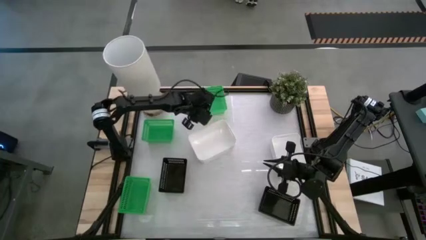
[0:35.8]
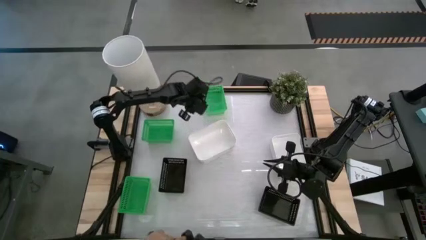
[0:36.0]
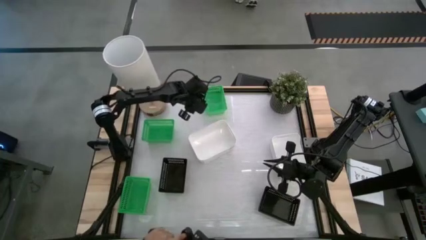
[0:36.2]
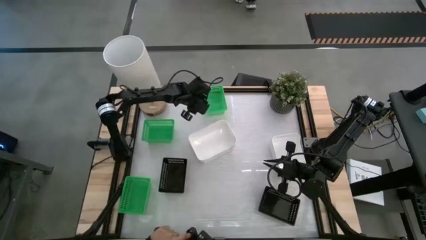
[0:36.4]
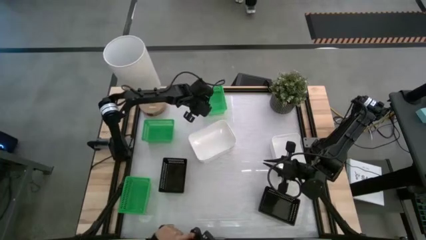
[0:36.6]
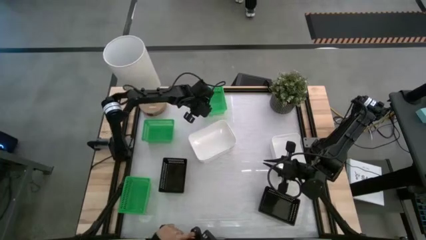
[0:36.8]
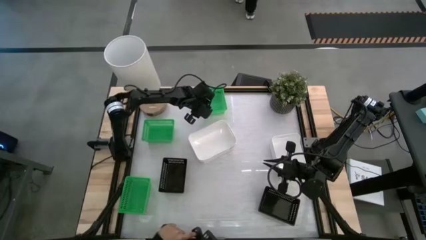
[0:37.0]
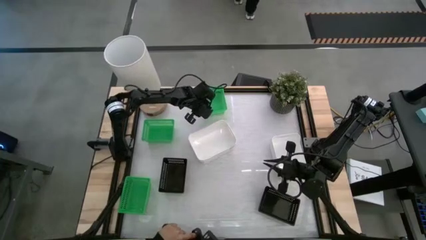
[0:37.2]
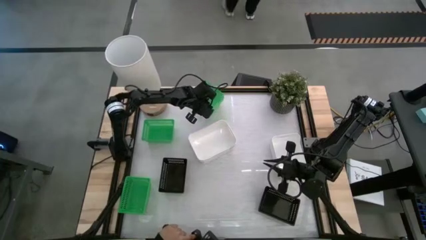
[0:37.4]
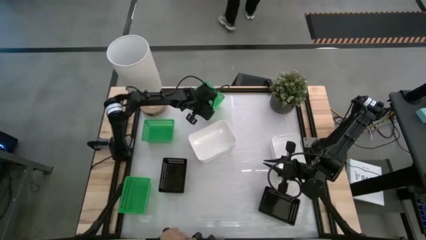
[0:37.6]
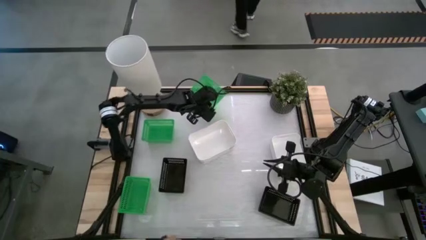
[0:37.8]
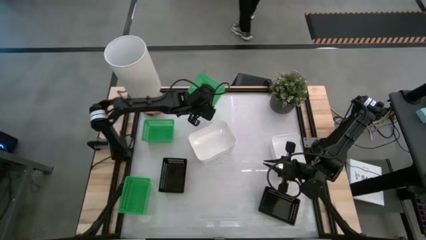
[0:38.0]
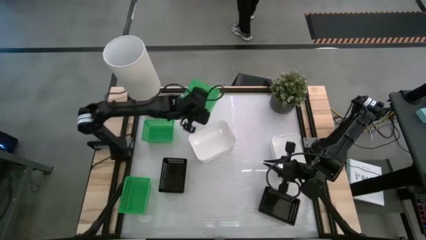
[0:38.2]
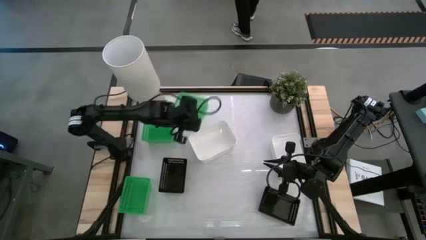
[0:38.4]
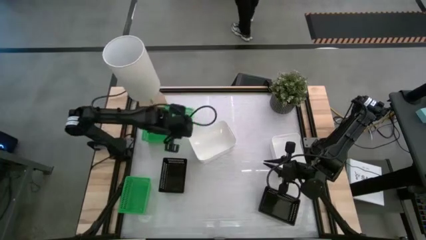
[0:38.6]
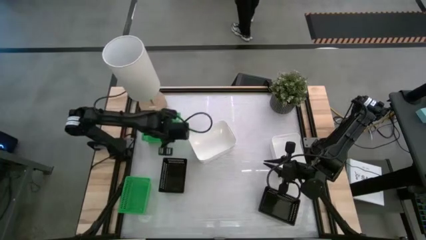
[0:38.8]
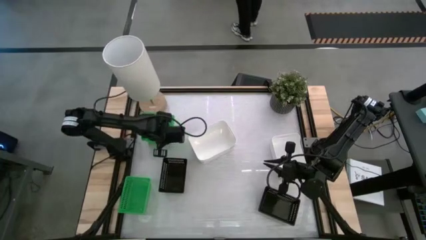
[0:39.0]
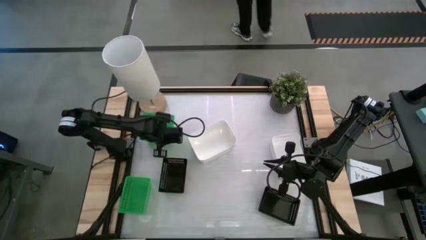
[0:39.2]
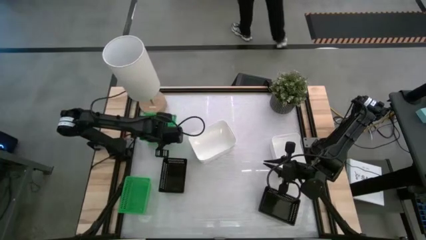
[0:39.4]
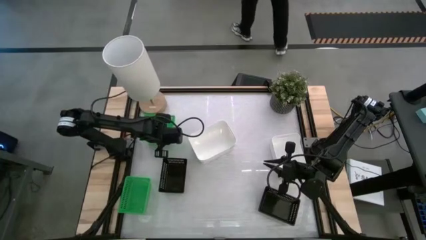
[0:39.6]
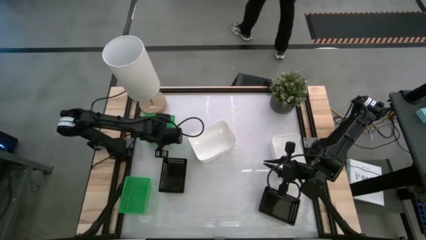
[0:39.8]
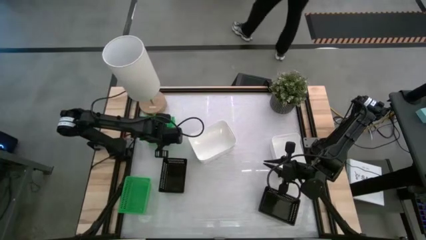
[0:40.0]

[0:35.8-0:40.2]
Stack the top green bin on top of the middle green bin

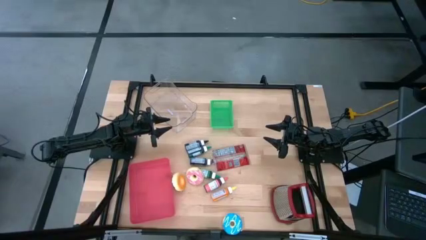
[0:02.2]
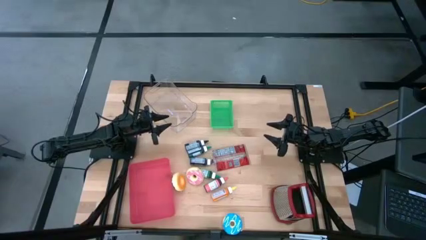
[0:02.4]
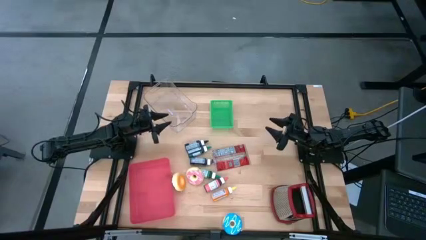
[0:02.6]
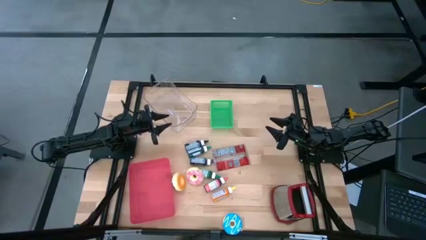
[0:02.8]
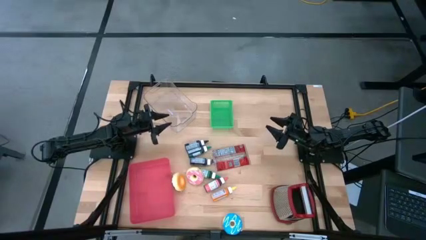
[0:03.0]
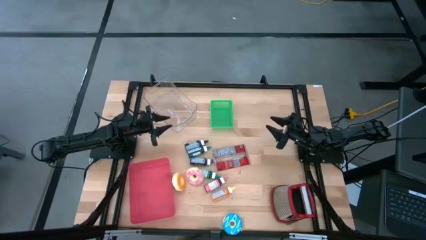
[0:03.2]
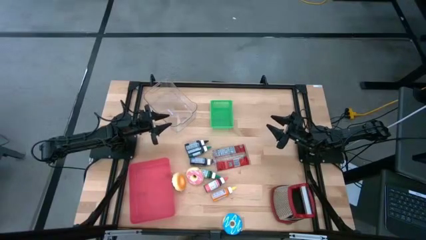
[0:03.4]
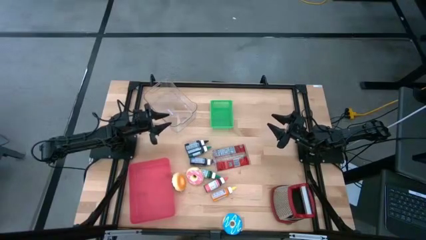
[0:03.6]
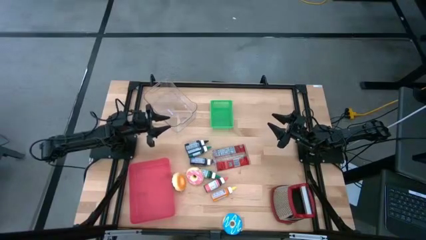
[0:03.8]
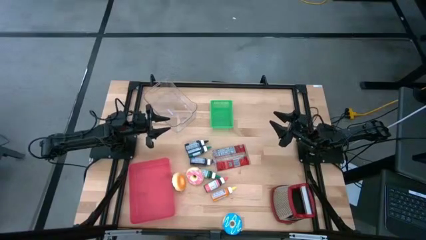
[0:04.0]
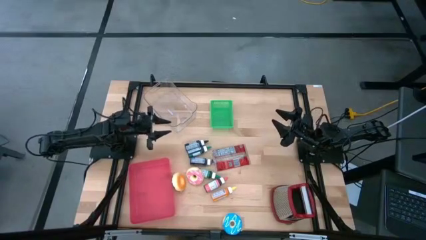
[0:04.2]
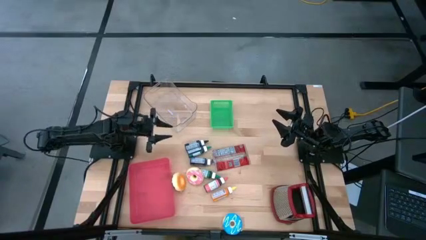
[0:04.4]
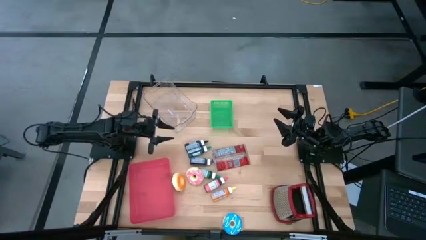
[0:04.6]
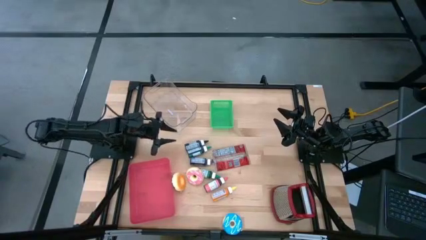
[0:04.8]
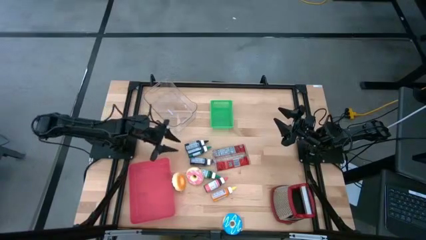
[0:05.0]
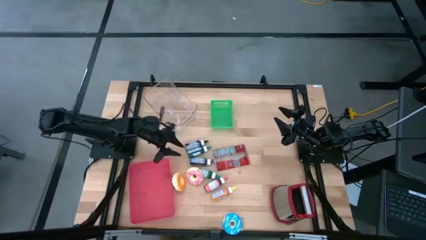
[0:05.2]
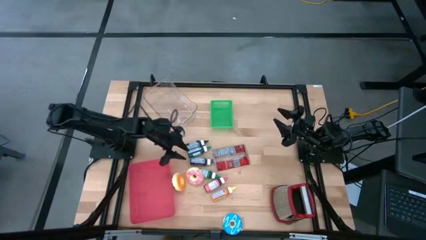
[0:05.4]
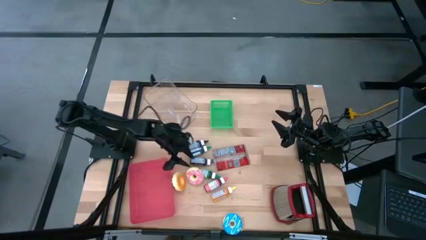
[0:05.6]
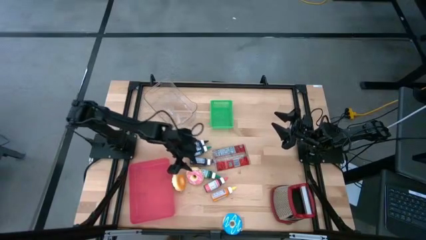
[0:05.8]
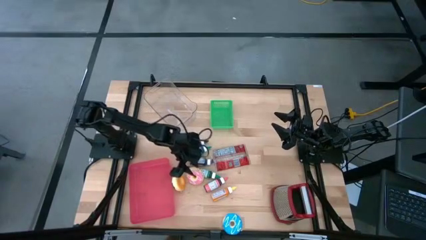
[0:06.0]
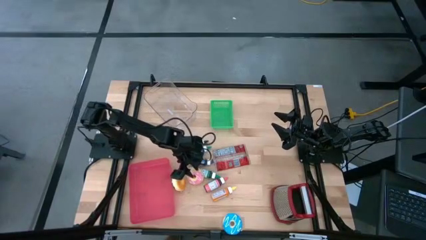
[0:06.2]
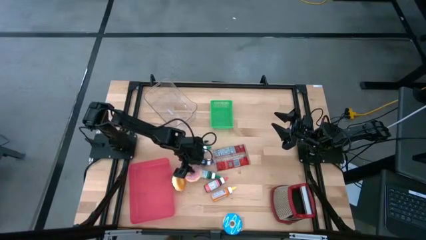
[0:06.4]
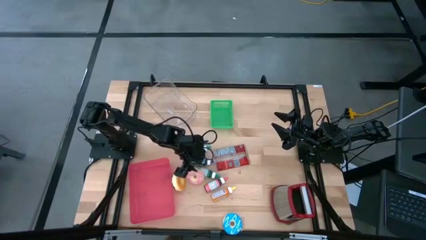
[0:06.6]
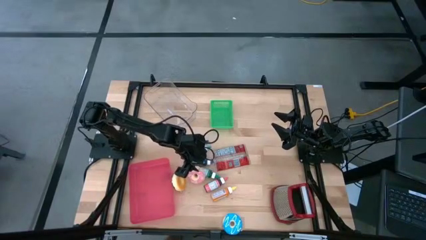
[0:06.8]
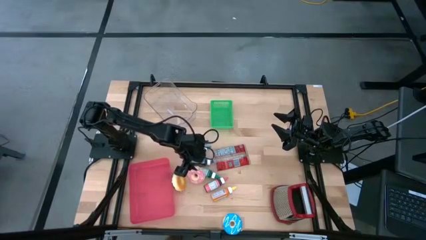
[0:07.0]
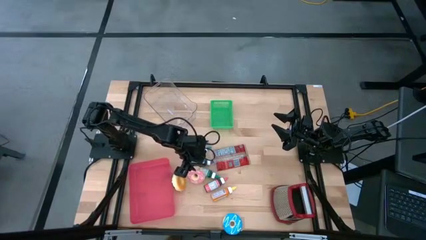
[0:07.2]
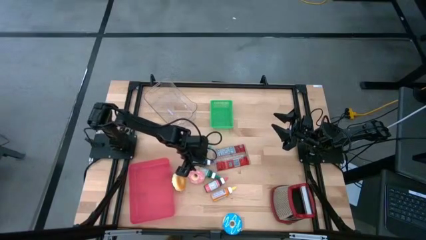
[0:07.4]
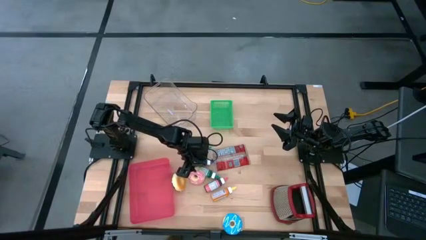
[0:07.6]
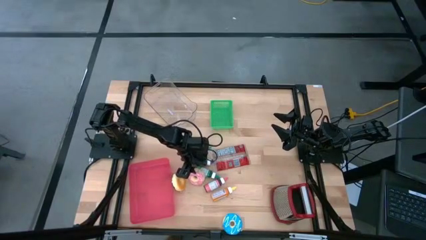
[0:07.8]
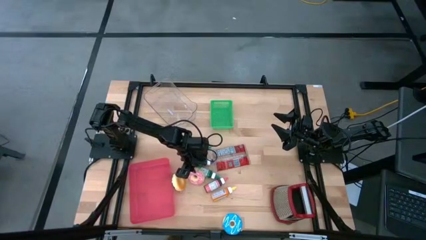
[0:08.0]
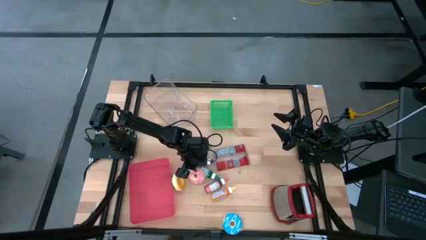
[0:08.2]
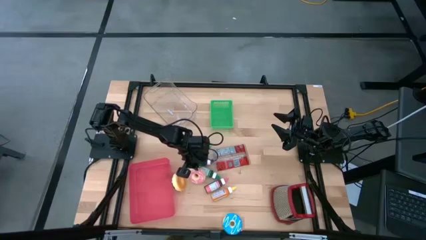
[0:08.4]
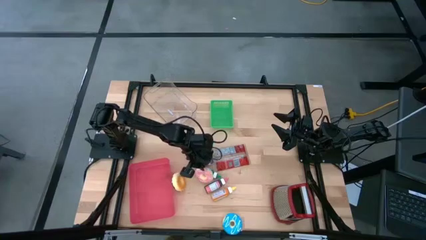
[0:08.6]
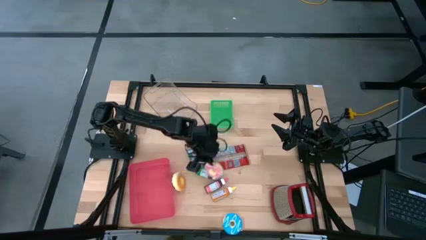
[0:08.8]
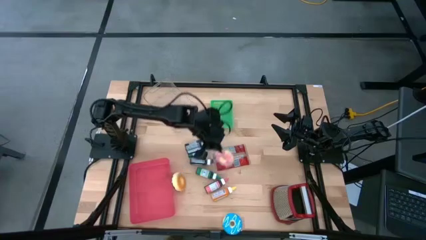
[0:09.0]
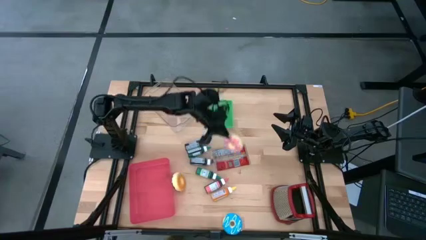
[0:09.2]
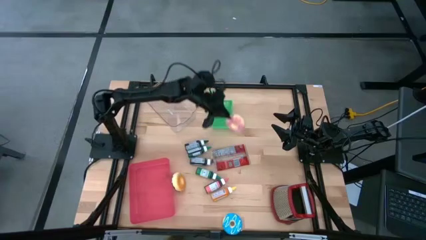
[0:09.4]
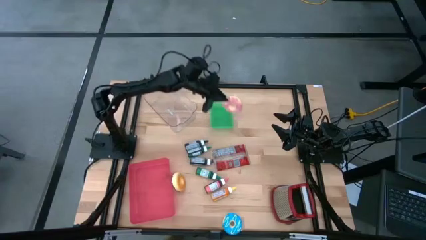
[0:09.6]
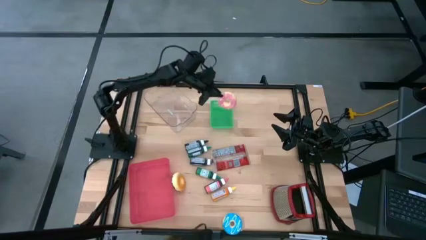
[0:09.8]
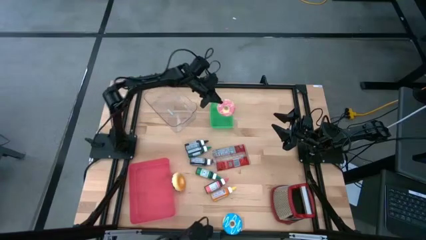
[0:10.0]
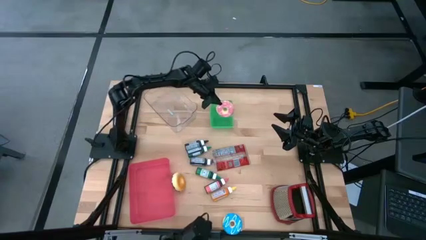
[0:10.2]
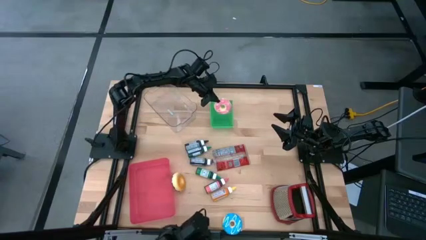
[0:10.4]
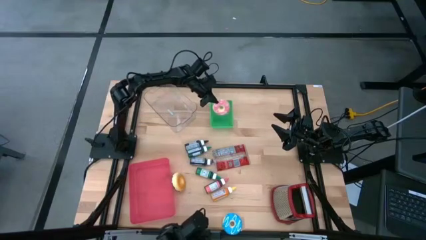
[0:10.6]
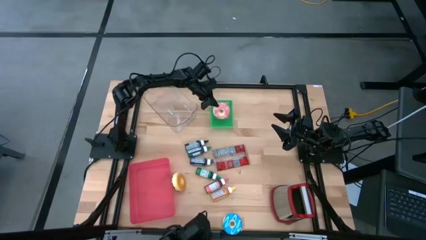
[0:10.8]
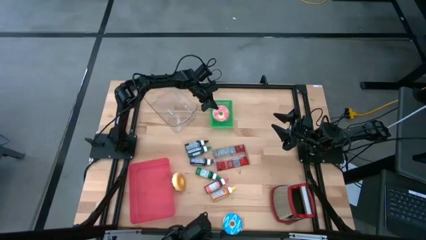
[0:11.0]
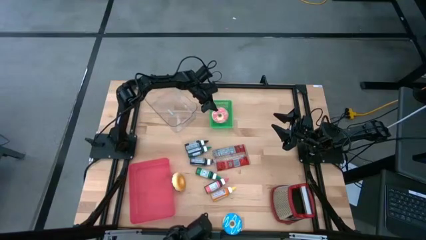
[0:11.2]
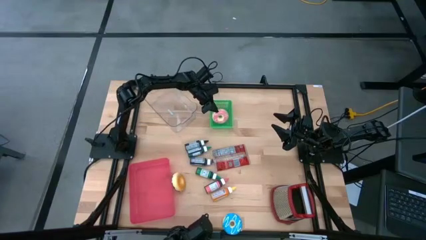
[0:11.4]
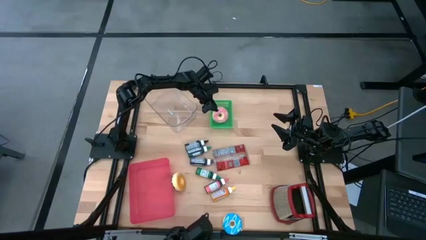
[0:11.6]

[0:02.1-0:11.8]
Put the pink donut into the green basket
